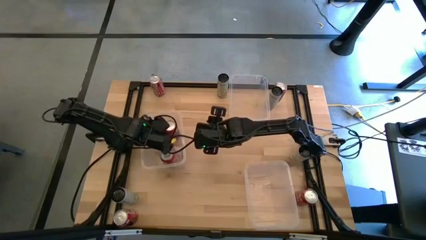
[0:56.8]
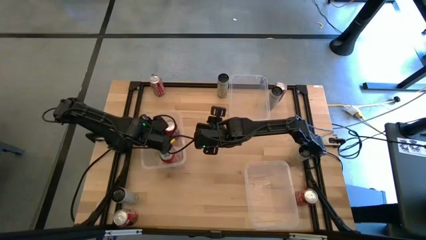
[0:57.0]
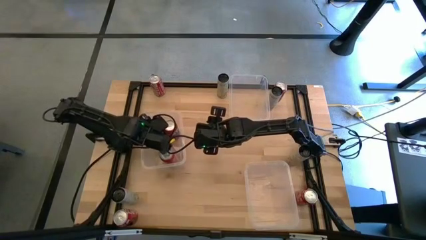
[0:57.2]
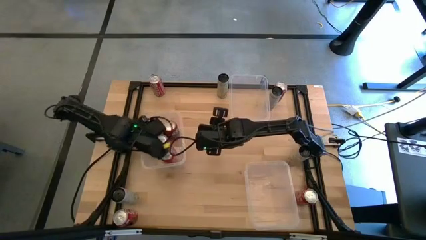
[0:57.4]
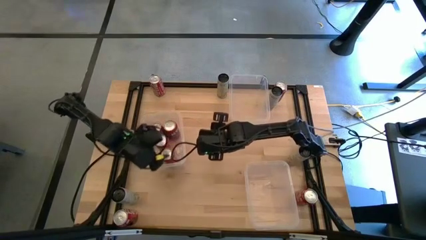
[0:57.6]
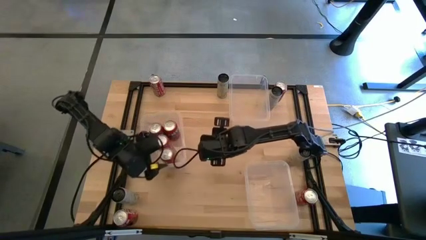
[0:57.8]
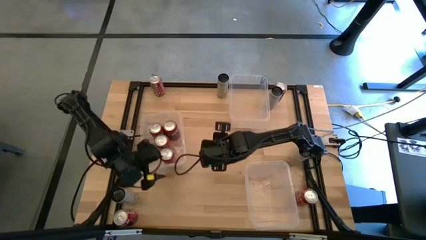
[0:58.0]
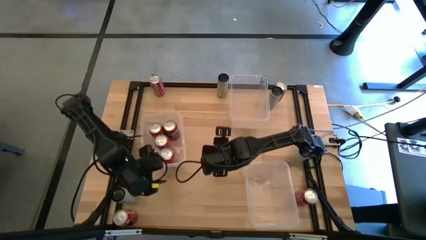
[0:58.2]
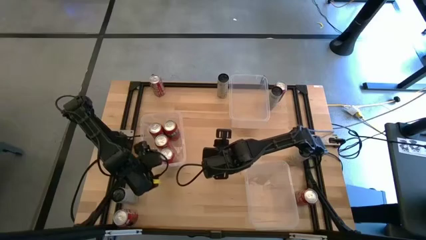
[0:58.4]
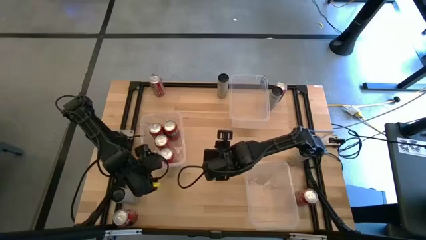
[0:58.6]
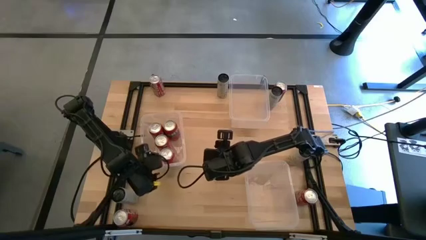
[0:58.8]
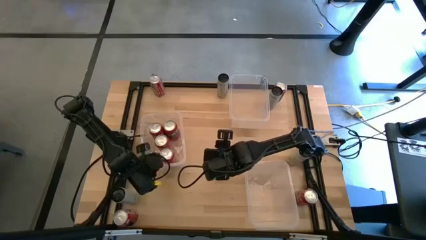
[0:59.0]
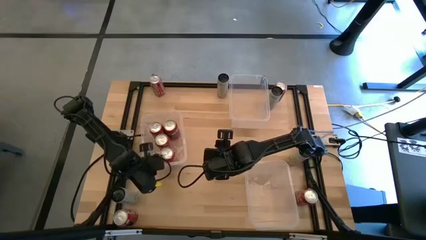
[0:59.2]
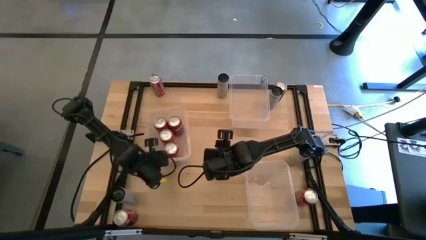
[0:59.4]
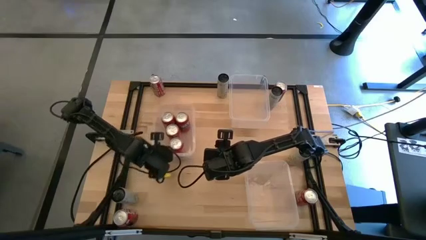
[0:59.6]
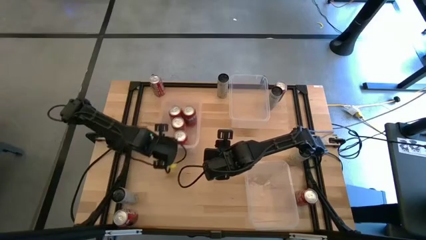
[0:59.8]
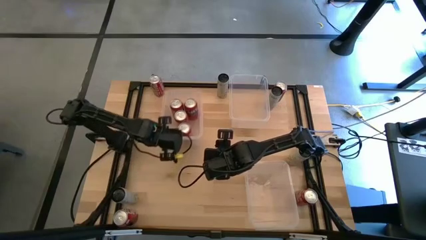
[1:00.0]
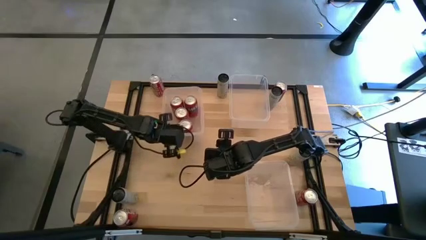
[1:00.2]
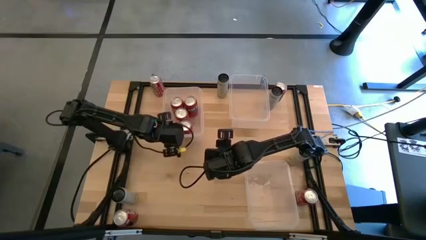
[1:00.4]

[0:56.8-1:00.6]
Task: Sort soda cans
Move the middle transparent bin to the top left of the table

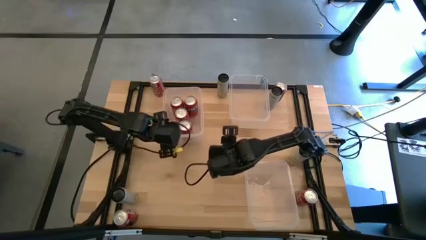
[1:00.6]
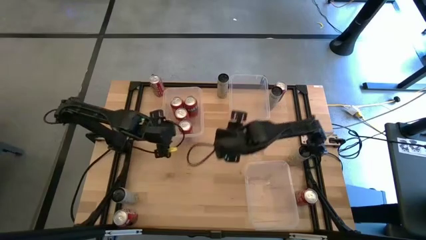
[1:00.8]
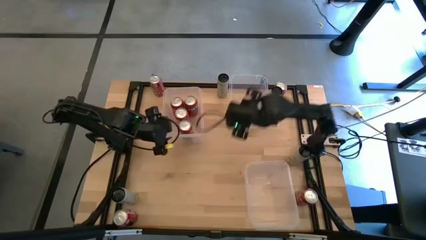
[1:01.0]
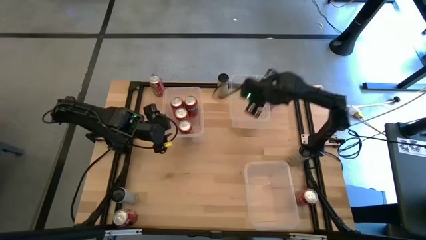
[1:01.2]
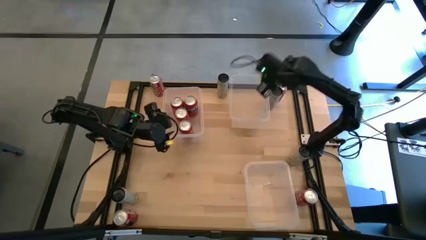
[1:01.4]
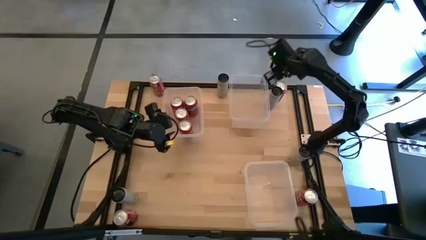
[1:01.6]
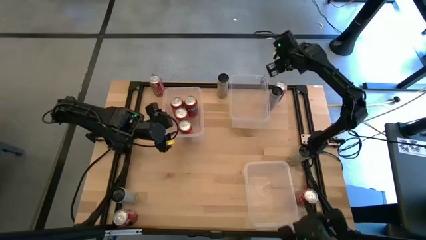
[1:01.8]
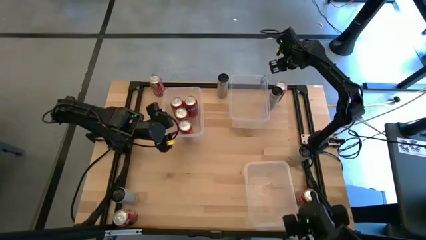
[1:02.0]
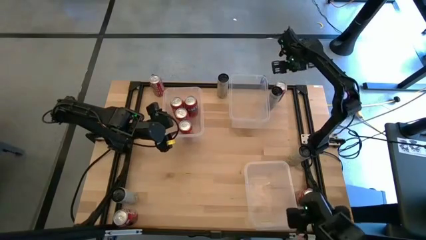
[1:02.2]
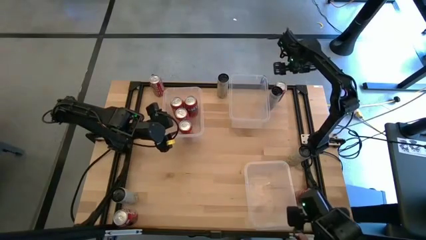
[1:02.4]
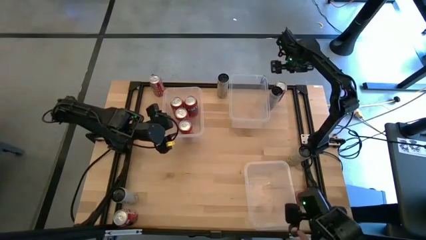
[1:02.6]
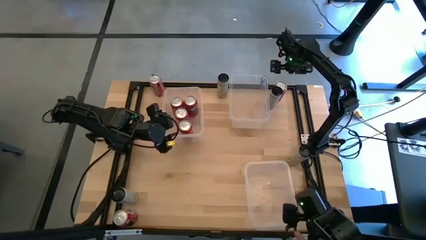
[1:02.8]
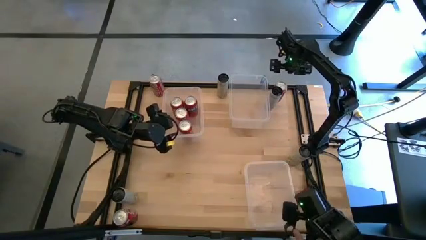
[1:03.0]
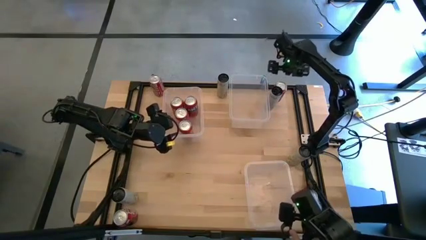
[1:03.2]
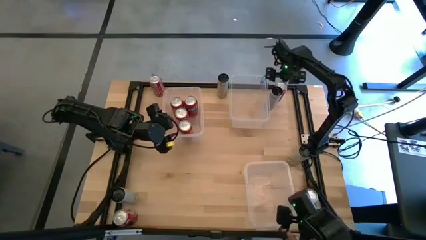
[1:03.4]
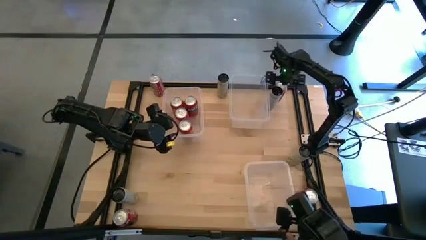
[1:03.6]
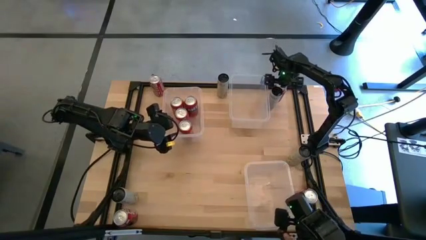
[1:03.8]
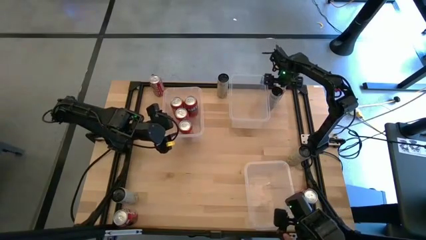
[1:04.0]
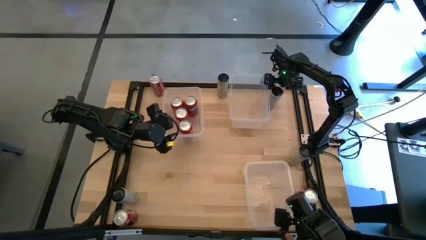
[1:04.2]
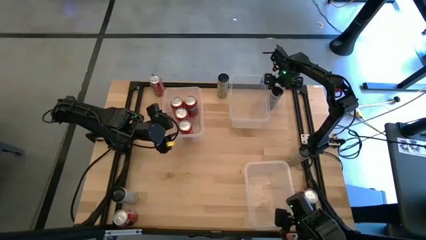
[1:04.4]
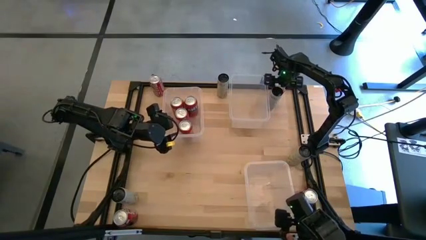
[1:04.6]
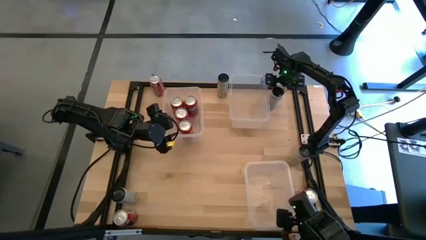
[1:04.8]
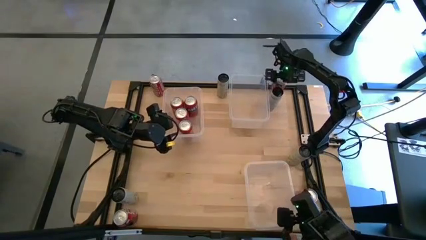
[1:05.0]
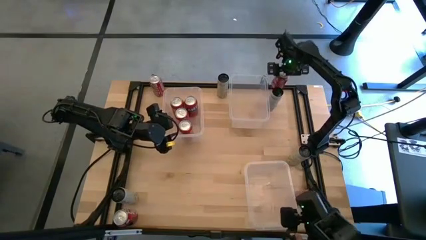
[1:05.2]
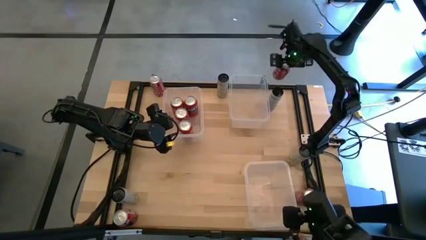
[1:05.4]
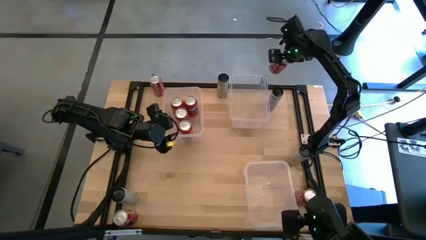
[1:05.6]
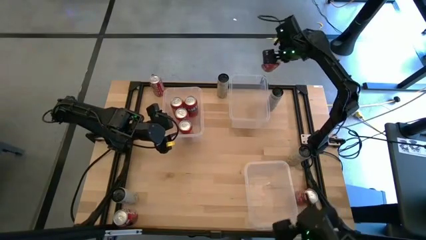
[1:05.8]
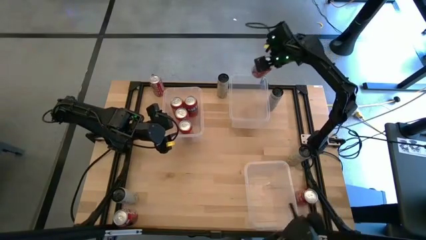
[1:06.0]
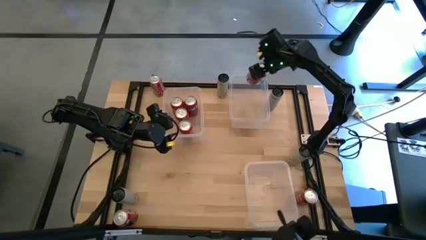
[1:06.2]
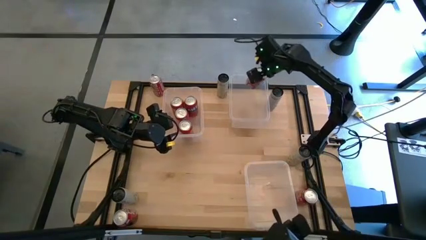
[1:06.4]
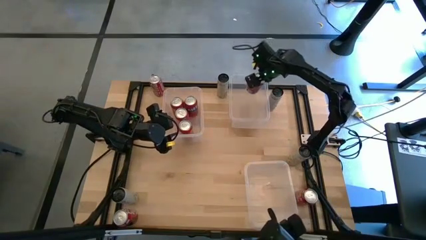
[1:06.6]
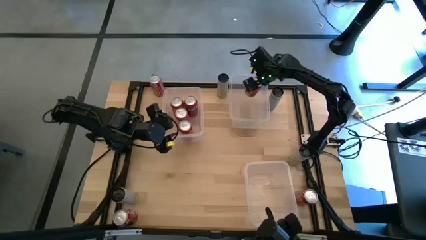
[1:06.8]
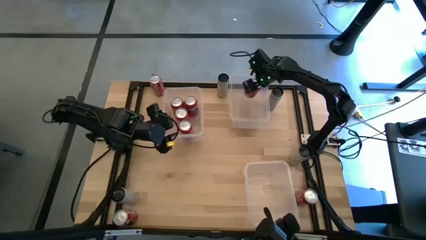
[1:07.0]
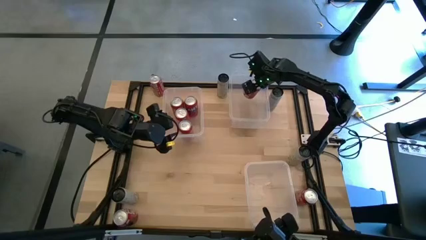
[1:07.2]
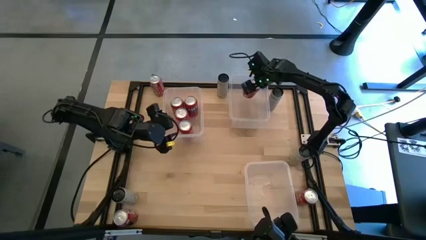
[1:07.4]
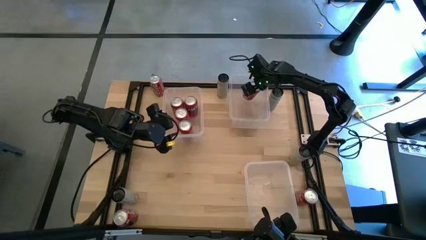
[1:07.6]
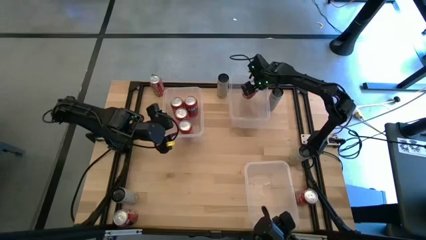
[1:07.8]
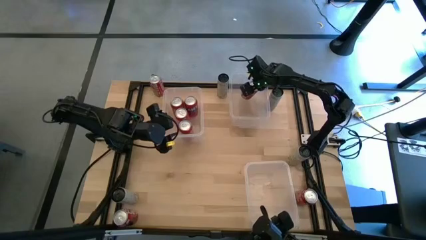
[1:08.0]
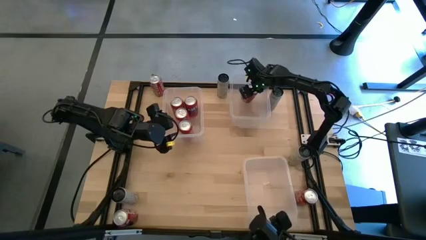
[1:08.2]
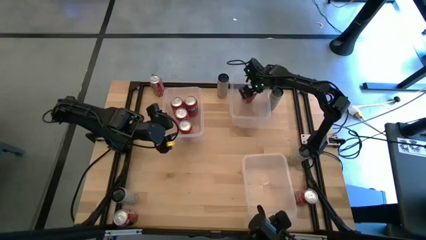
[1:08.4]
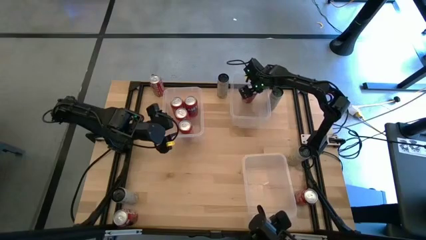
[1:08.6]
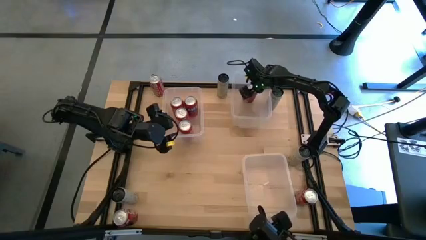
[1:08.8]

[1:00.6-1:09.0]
Put the red-white soda can into the top right transparent bin
